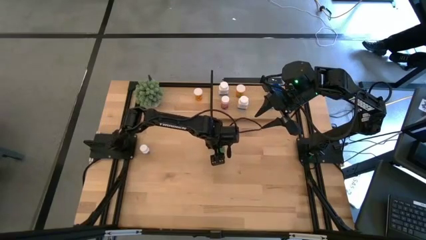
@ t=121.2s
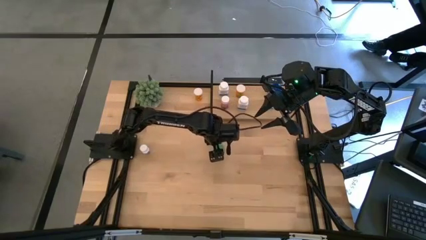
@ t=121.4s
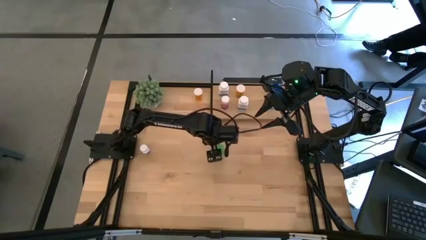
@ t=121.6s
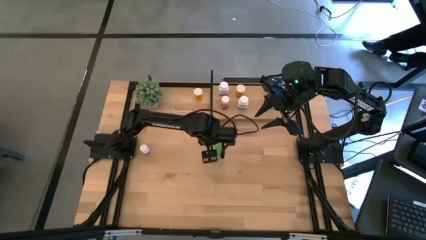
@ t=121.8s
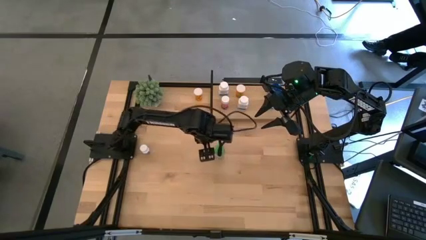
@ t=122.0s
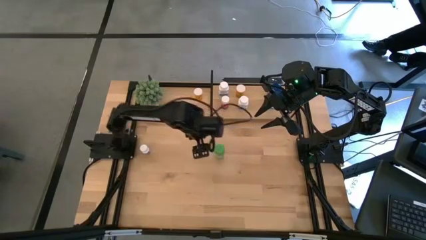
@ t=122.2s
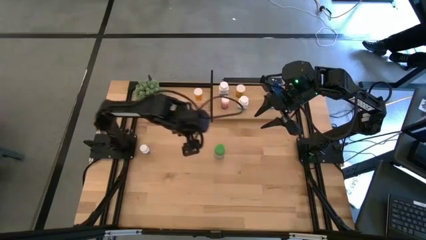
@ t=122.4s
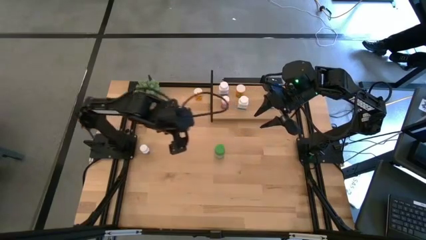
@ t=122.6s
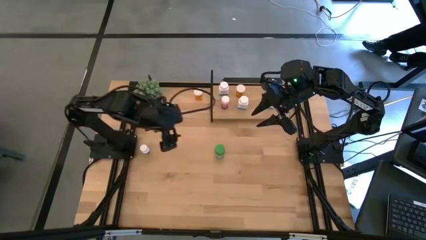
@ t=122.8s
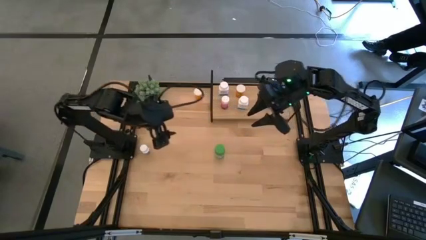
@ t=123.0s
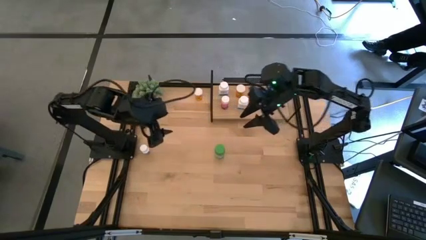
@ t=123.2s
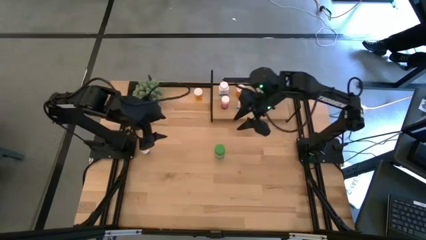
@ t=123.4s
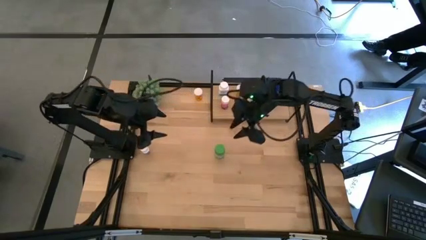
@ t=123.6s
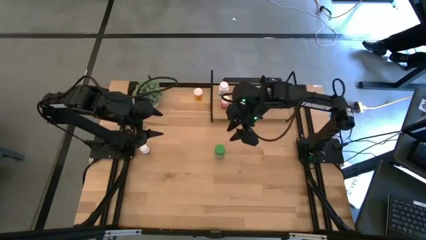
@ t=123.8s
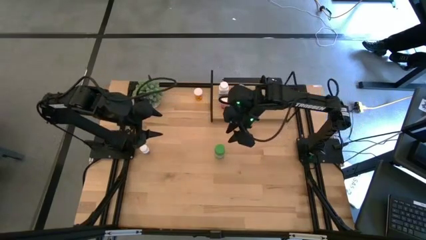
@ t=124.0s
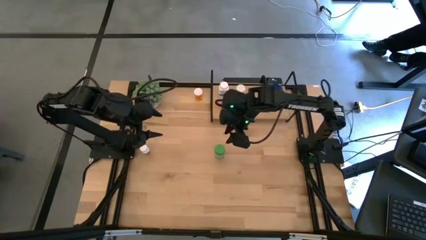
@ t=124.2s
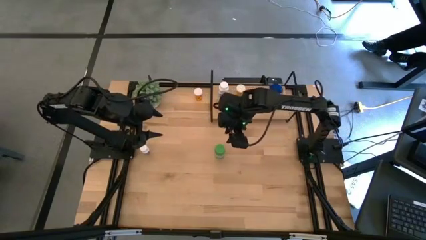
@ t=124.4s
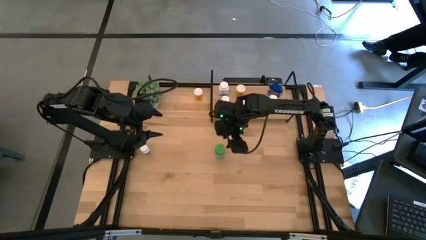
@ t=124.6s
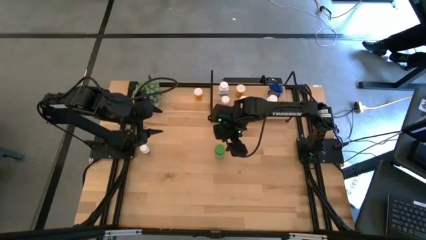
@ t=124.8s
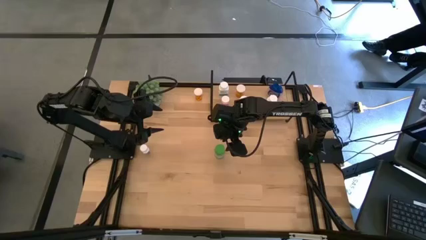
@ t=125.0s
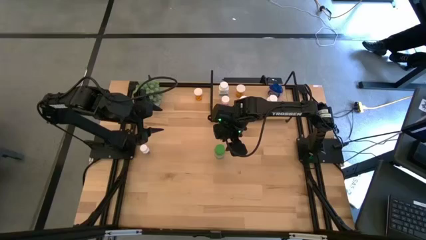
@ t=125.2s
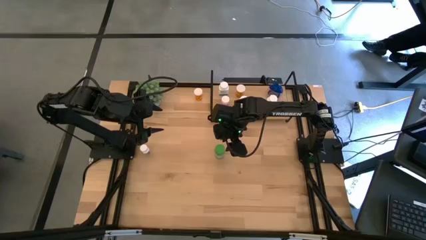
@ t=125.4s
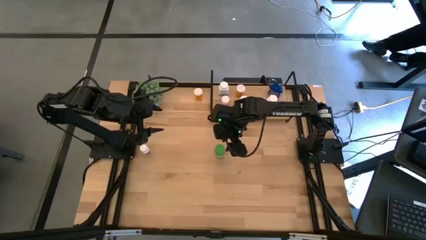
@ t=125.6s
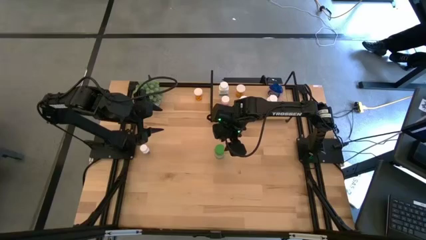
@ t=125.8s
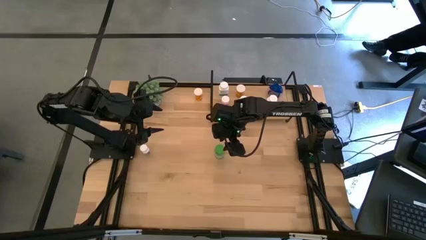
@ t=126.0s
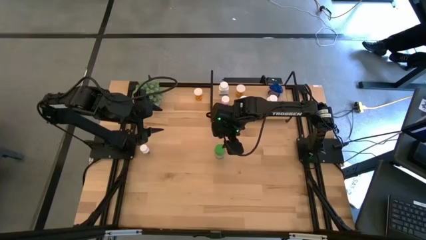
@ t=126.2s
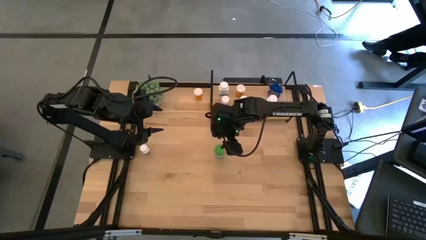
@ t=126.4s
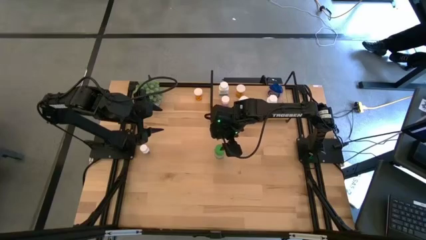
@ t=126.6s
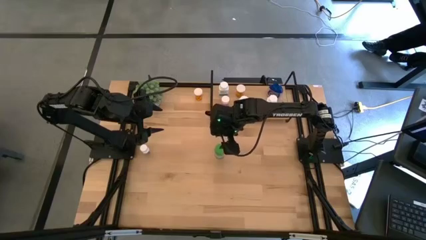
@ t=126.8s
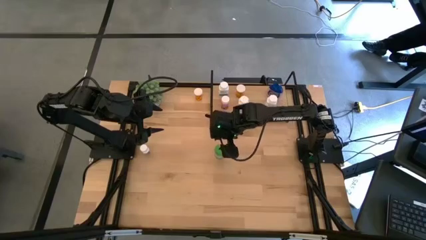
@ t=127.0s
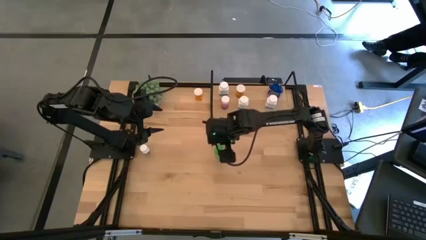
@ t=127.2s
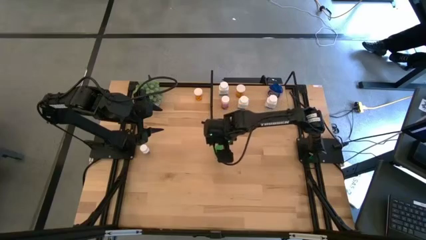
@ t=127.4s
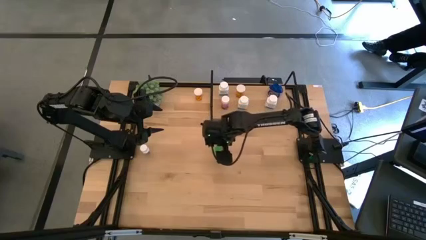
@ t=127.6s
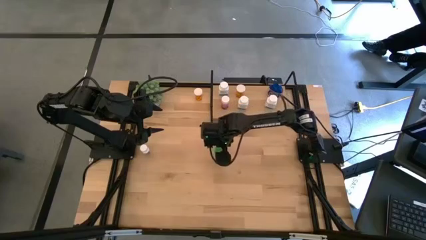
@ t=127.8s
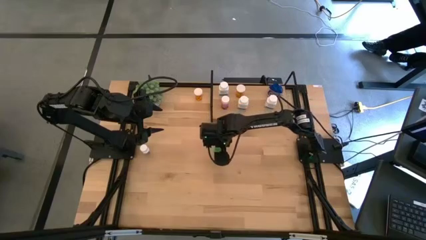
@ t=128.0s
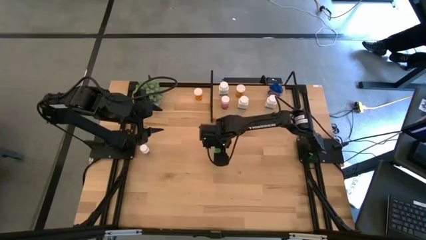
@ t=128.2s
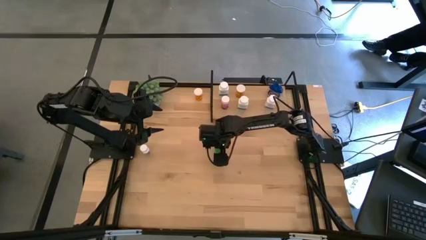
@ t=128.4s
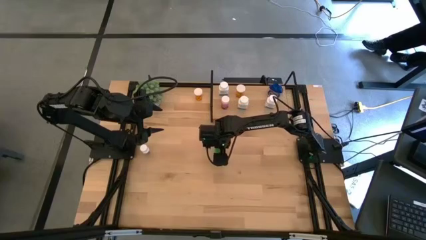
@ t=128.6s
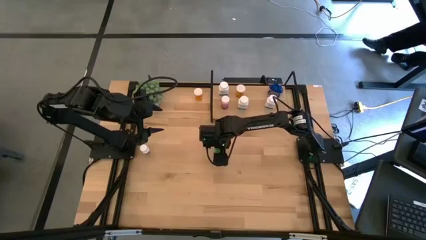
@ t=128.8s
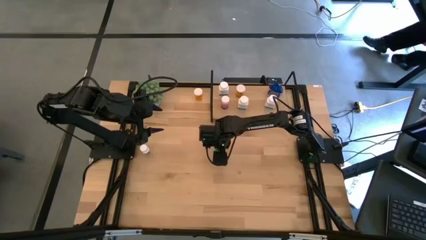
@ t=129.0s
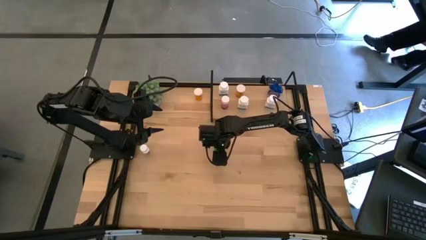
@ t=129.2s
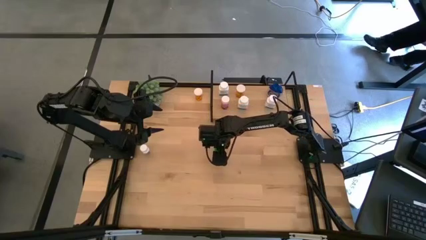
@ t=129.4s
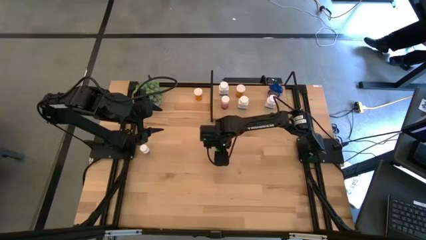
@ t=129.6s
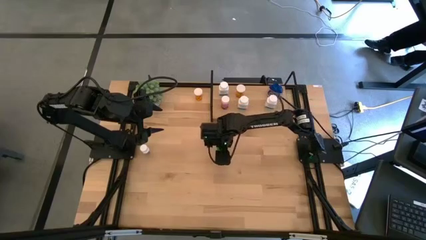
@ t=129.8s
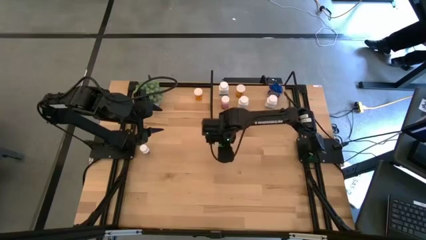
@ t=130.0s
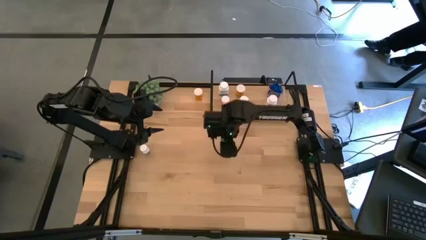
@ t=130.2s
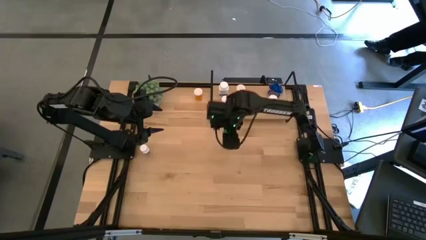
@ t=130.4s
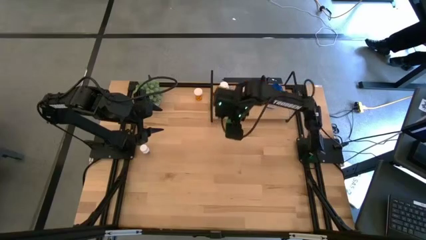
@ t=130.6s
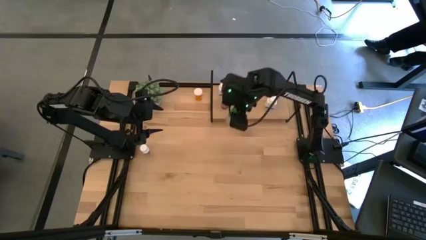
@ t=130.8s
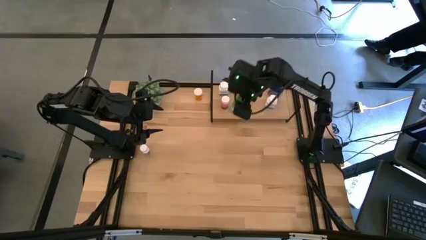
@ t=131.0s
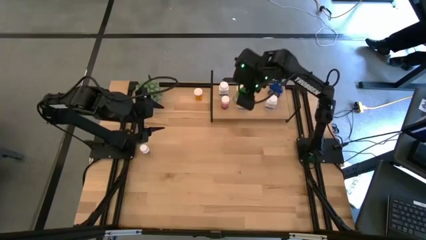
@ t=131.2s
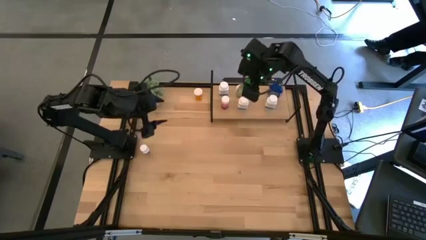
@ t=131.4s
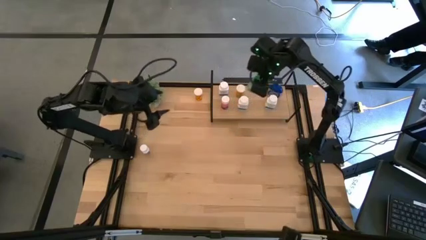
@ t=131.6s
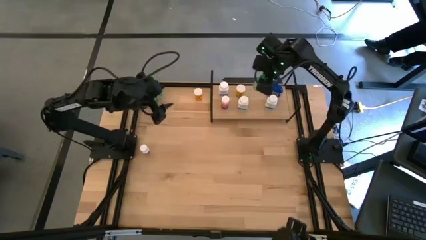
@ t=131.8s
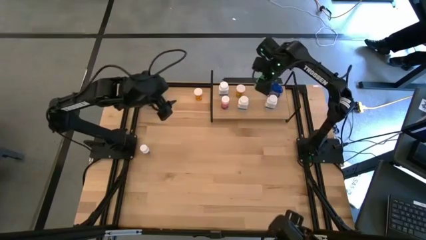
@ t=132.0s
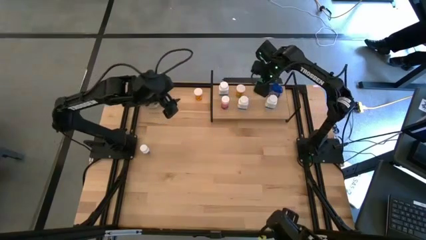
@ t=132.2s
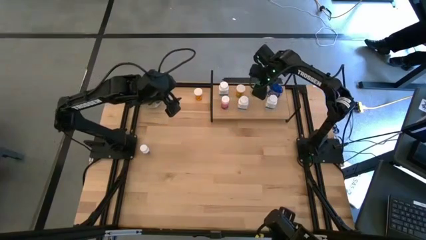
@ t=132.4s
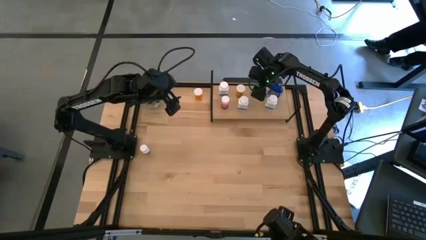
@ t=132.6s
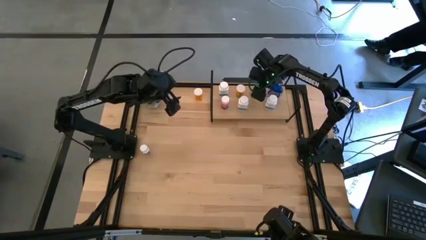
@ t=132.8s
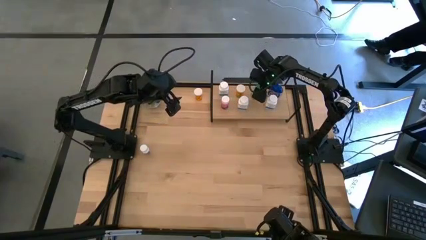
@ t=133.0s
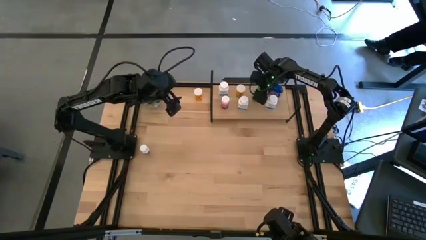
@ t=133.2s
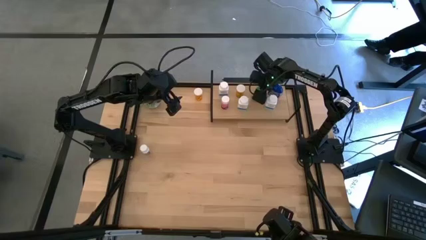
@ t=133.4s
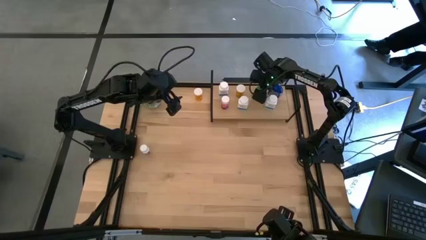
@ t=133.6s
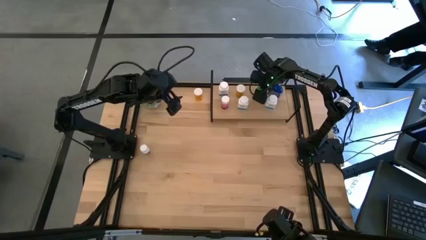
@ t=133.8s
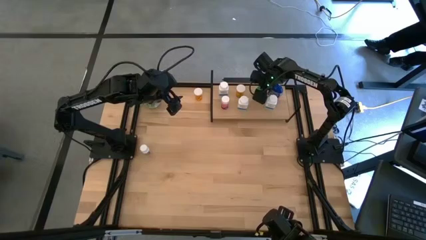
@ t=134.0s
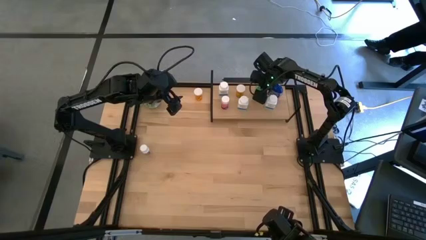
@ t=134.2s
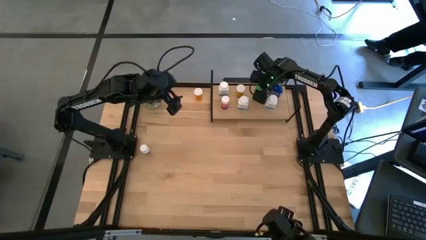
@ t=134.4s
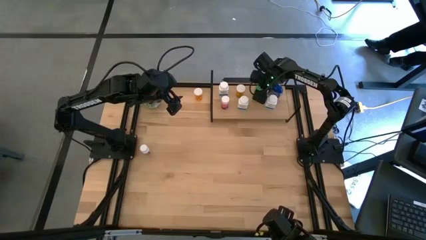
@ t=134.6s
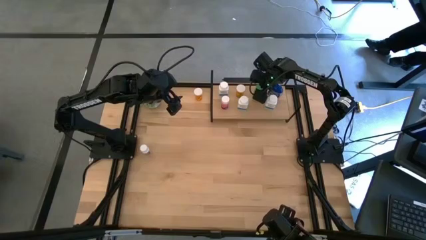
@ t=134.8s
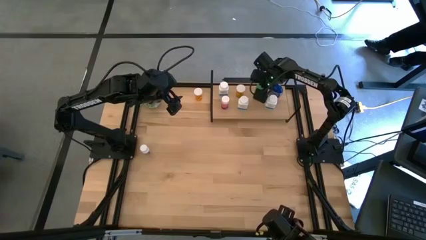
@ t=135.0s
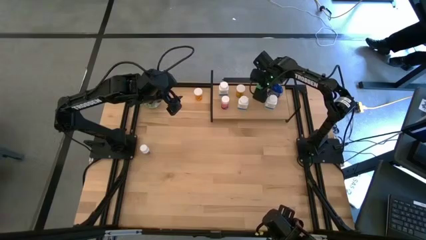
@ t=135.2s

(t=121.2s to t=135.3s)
Task: Pick and place medicine bottles onto shelf by color
Put the green medicine bottle on the shelf
